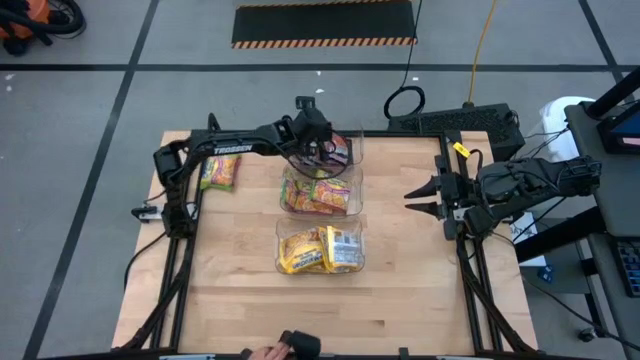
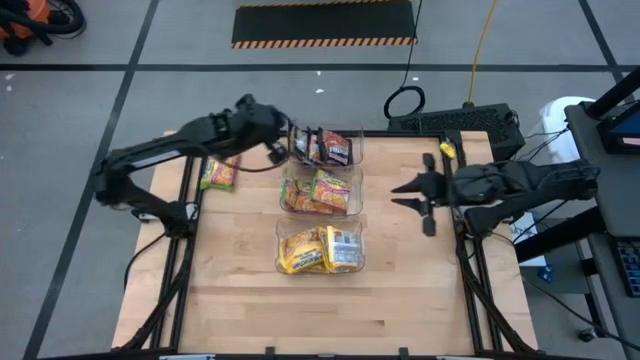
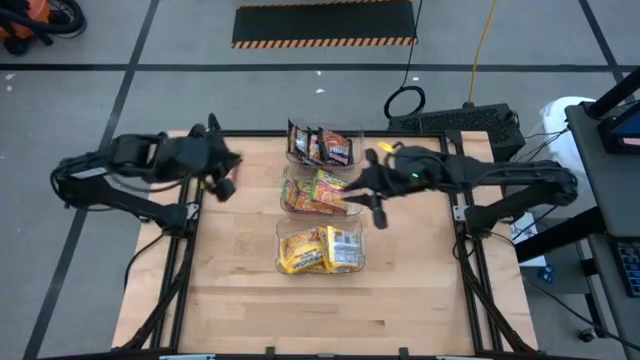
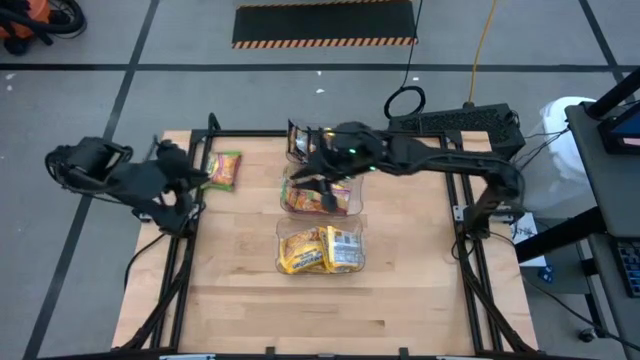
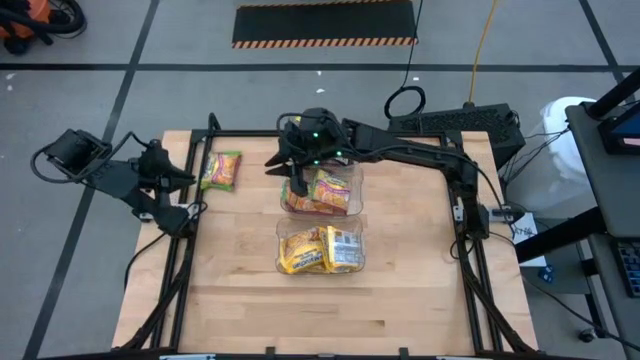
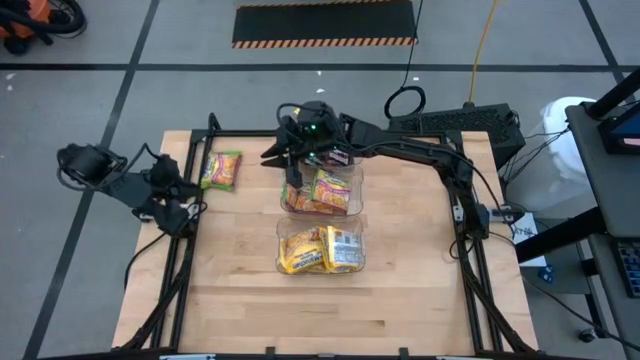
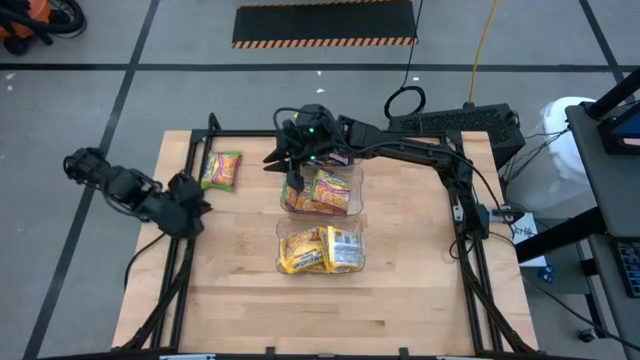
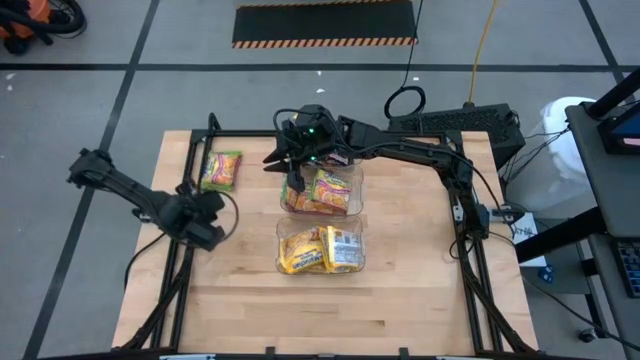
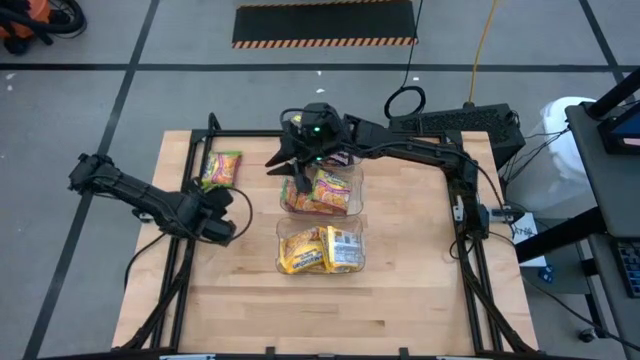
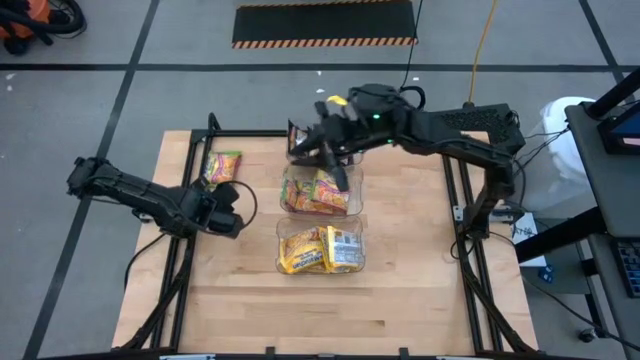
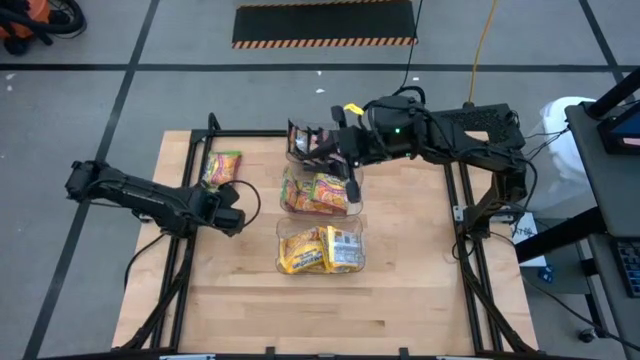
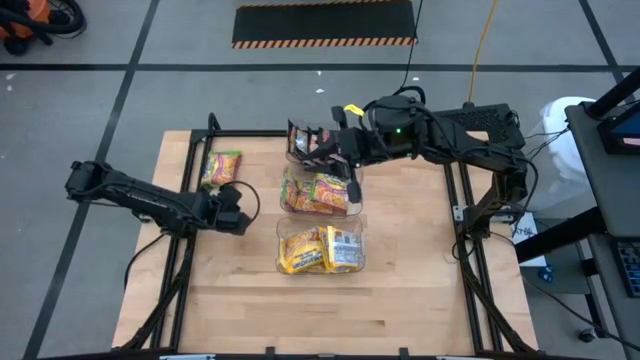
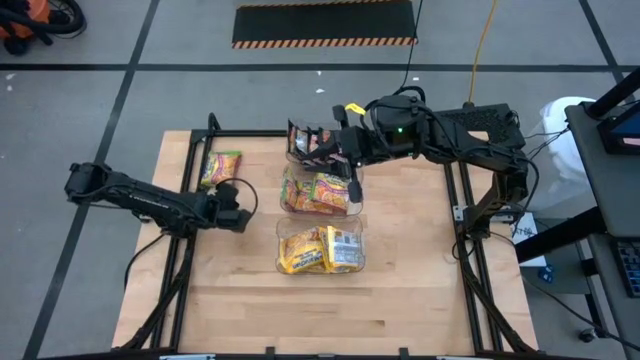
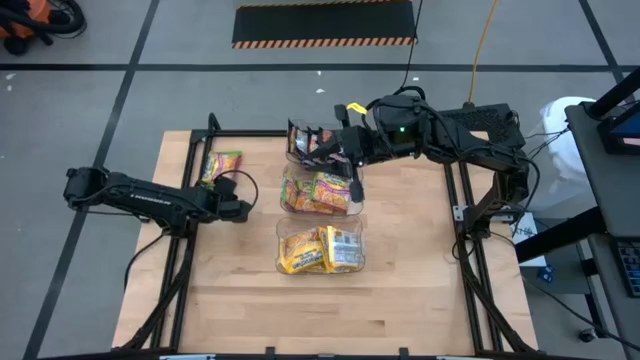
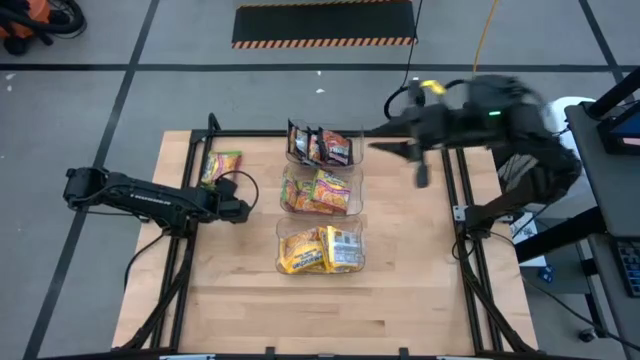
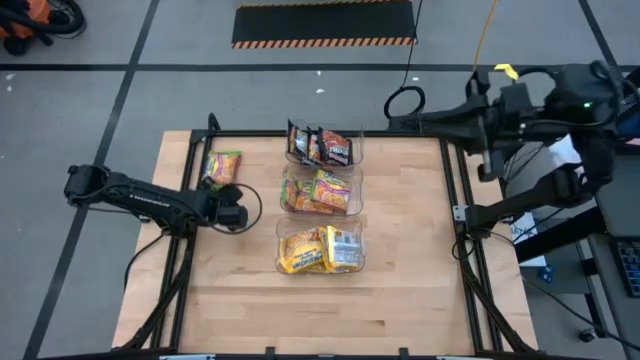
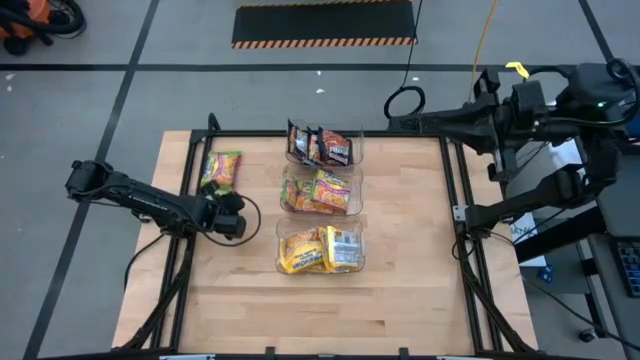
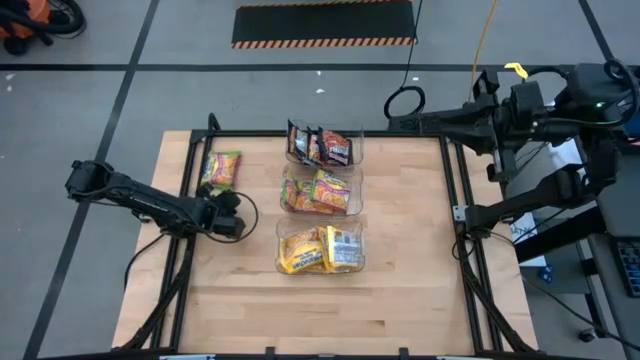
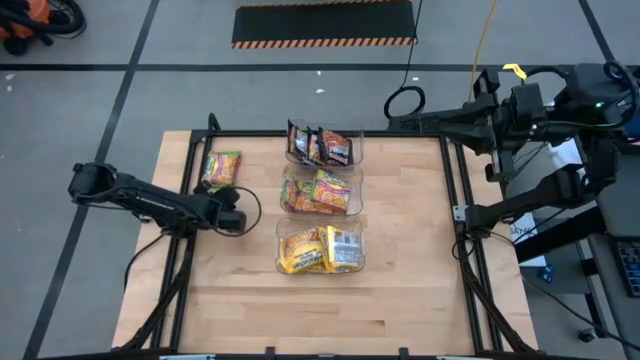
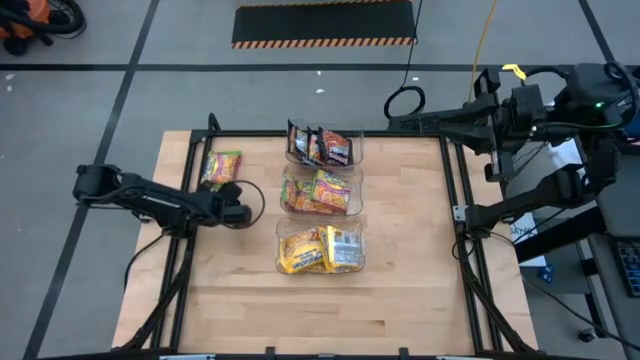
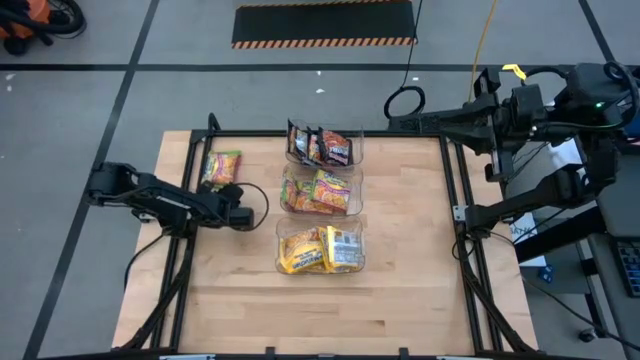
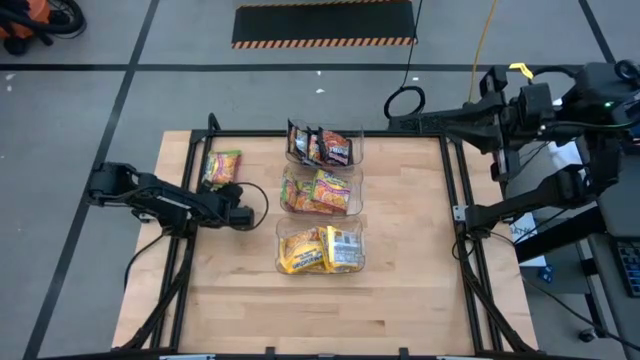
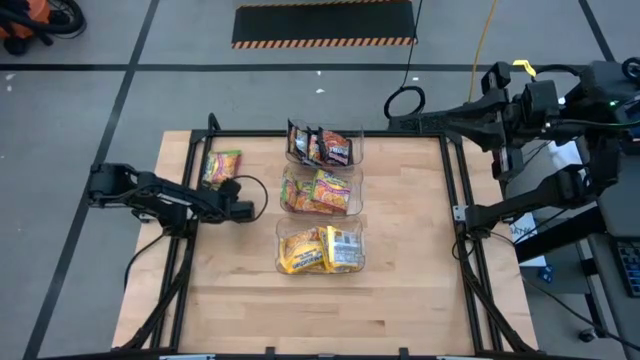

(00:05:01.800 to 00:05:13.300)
Task: Sort Maruchan noodles
Put the green noodle pack into the center transparent bin

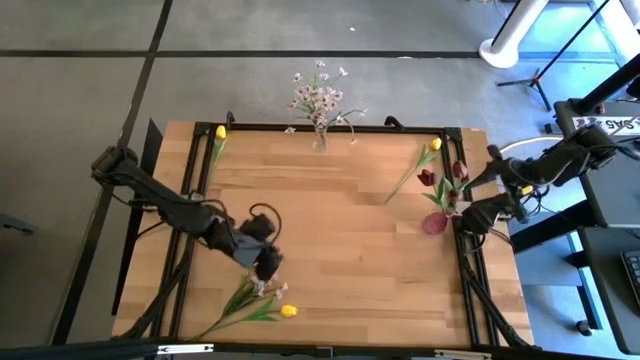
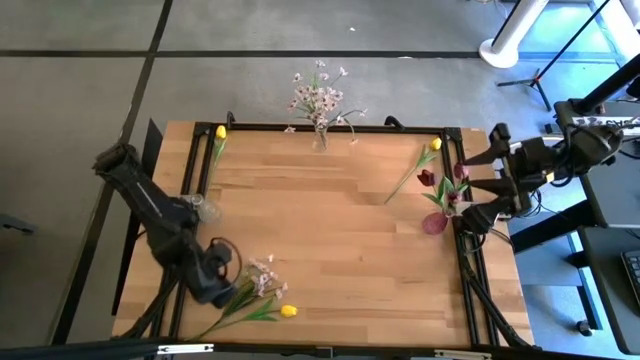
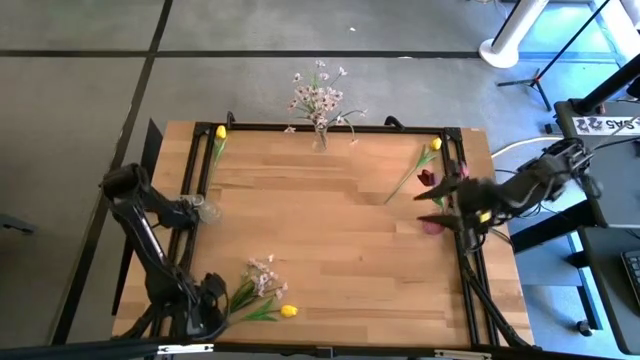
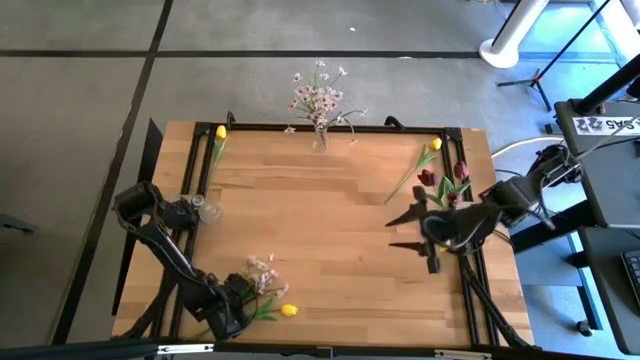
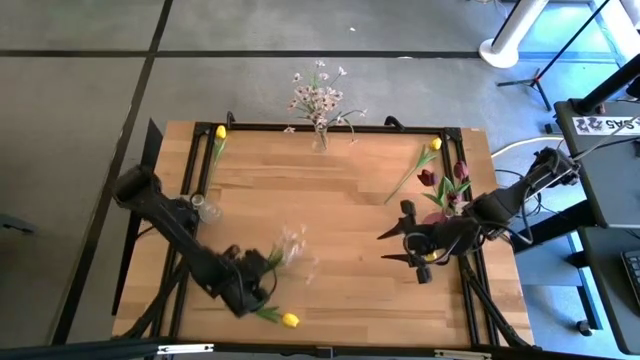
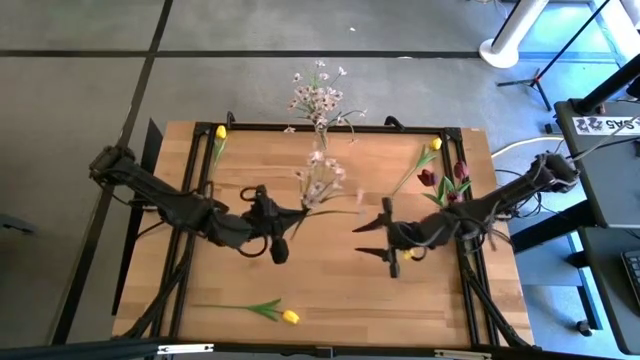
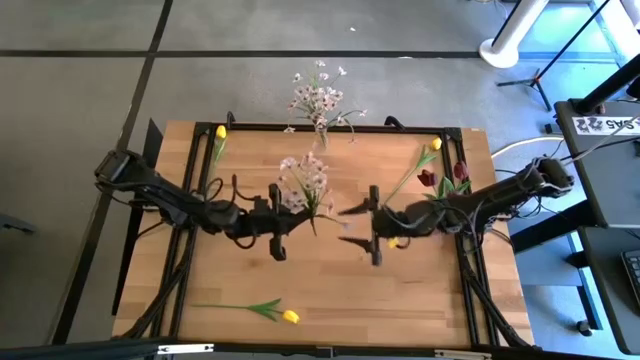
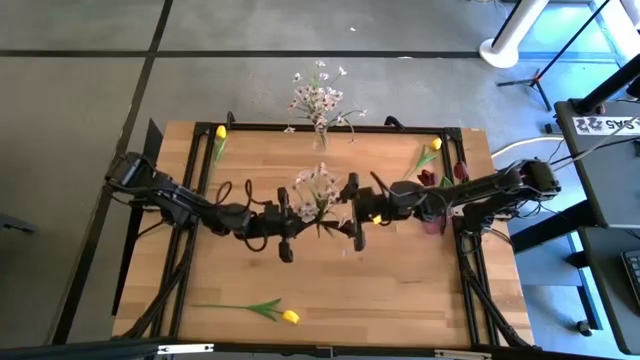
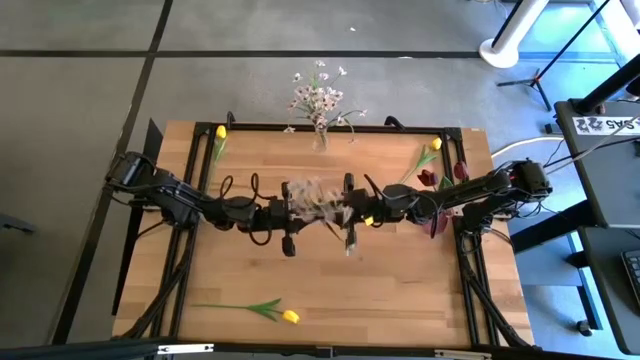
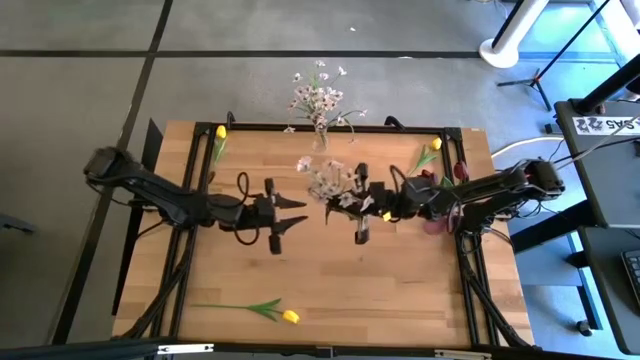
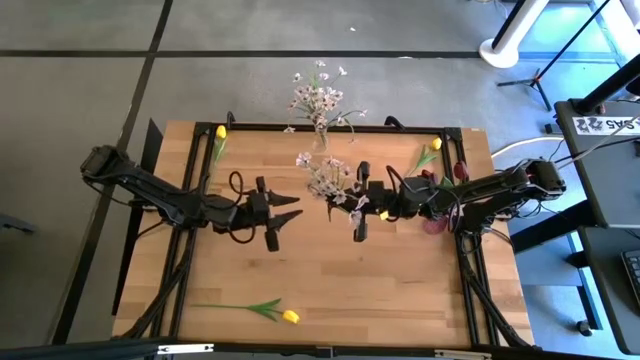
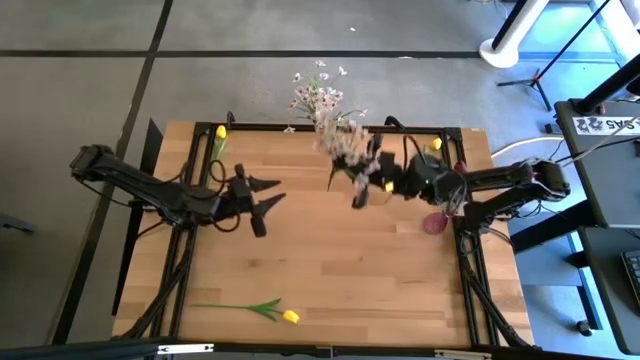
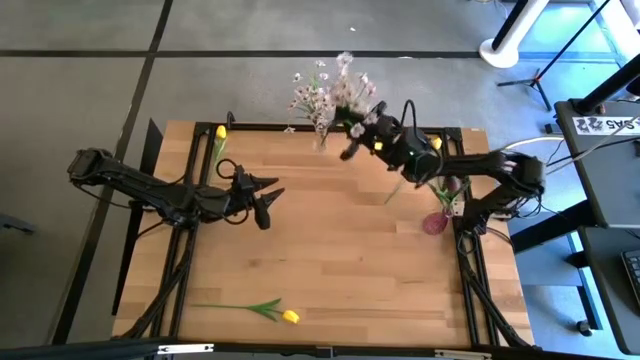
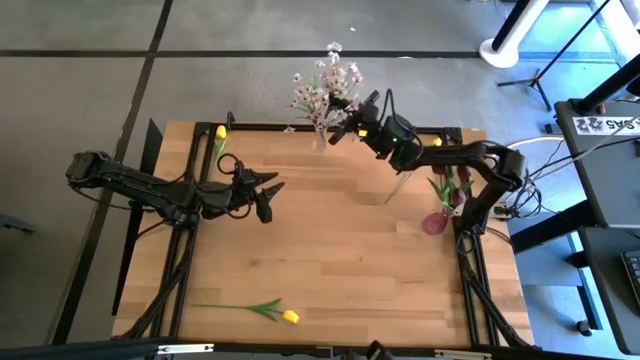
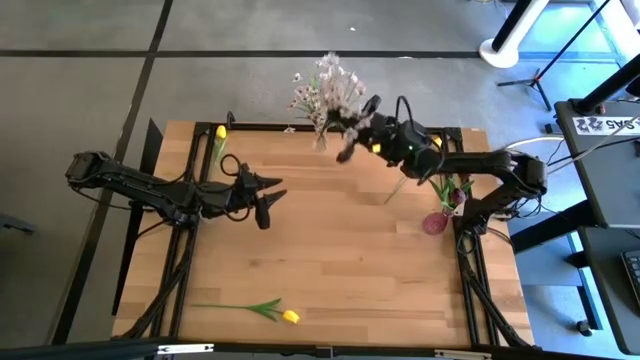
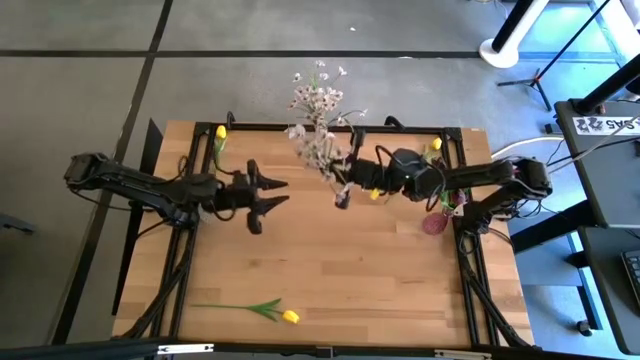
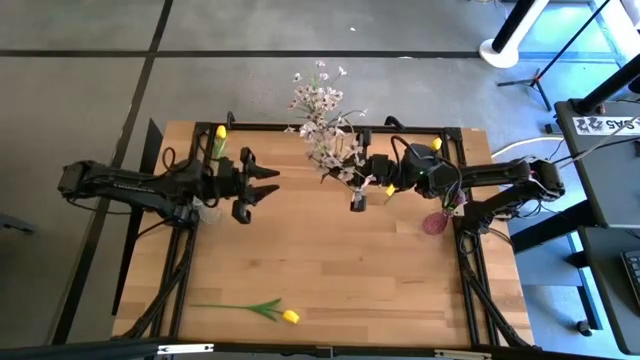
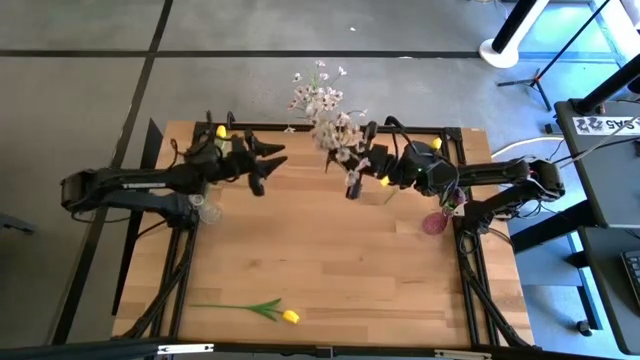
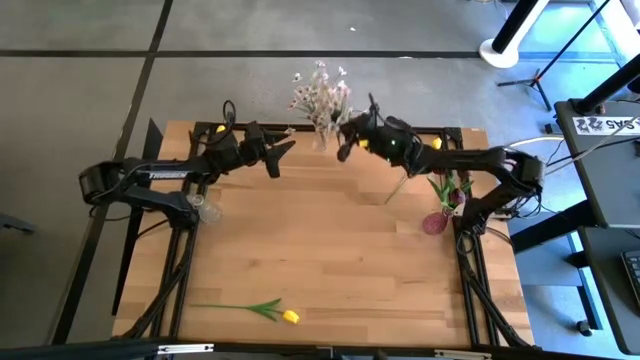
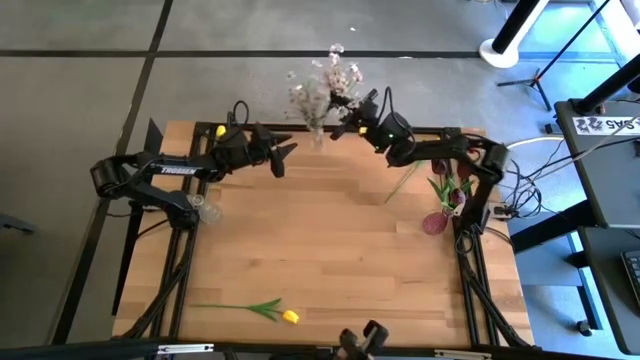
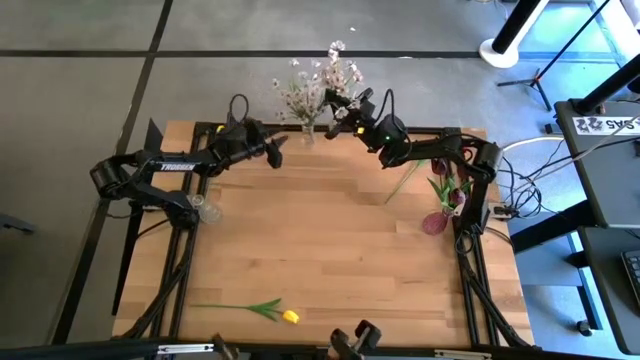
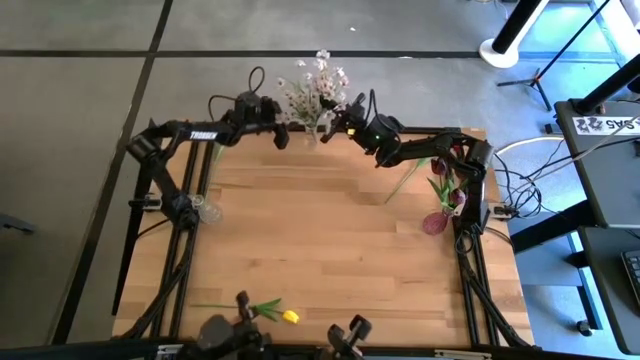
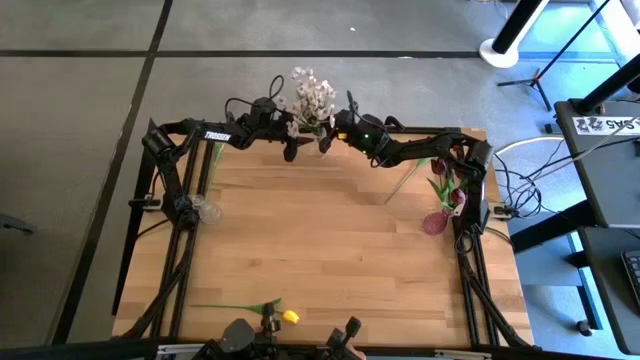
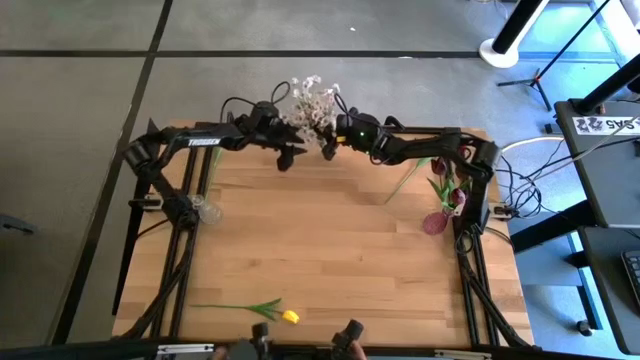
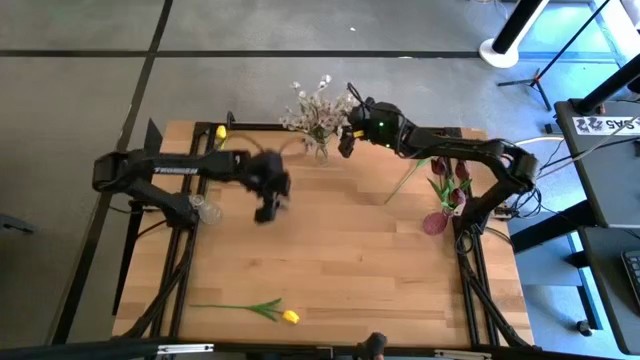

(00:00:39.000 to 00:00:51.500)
Task: Sort flowers into vase by color
Put the white flower into the top transparent vase
